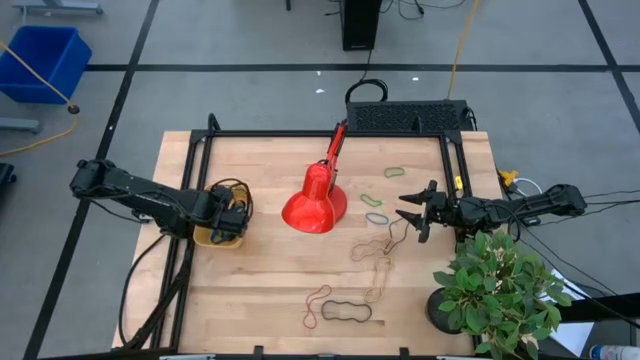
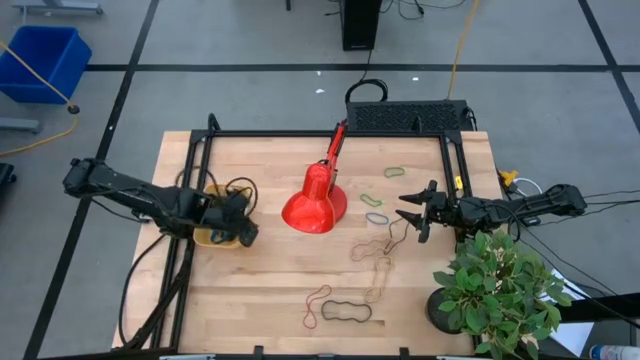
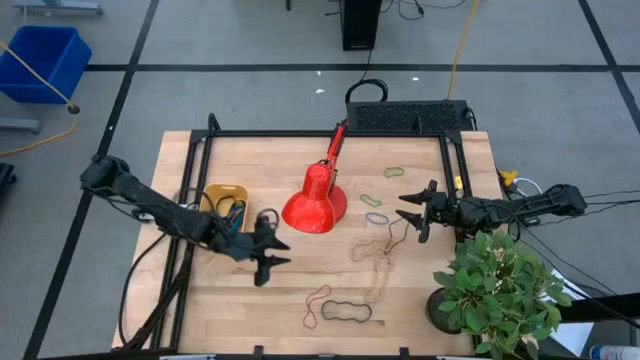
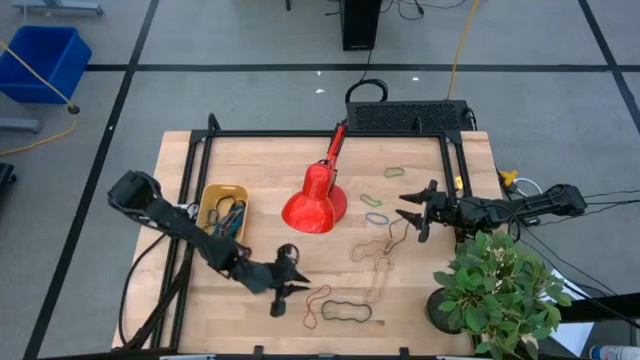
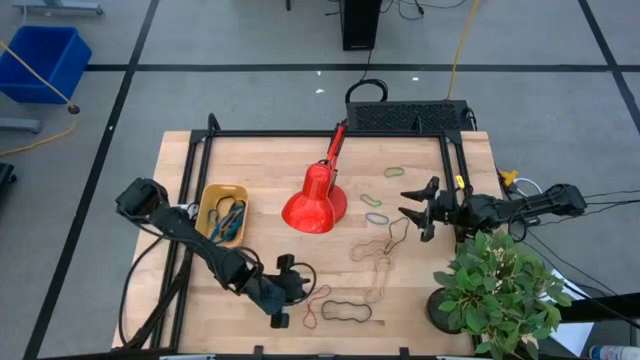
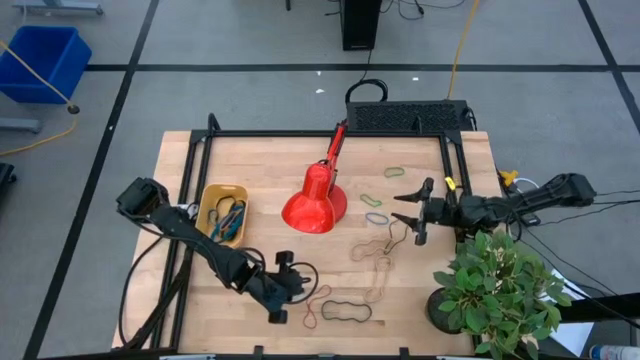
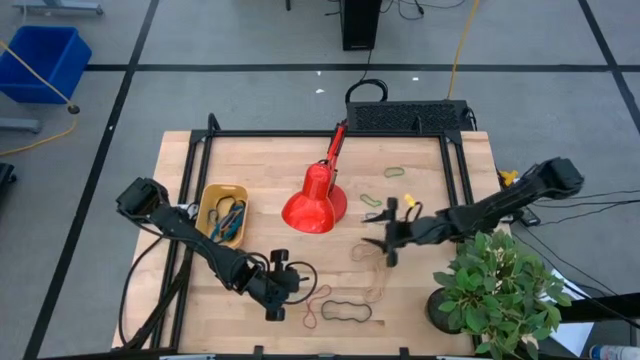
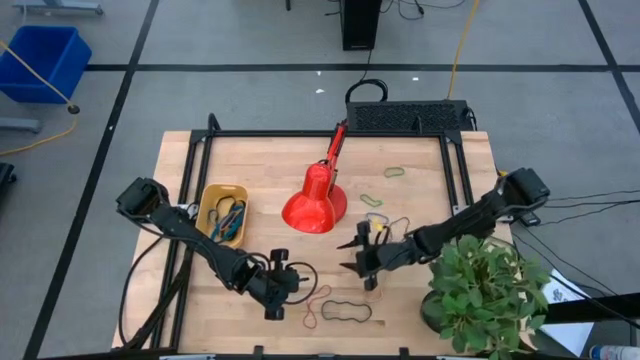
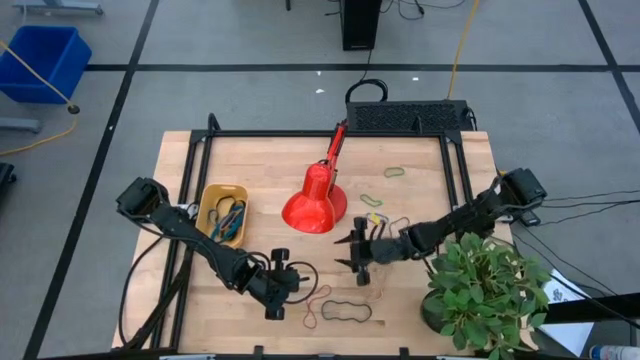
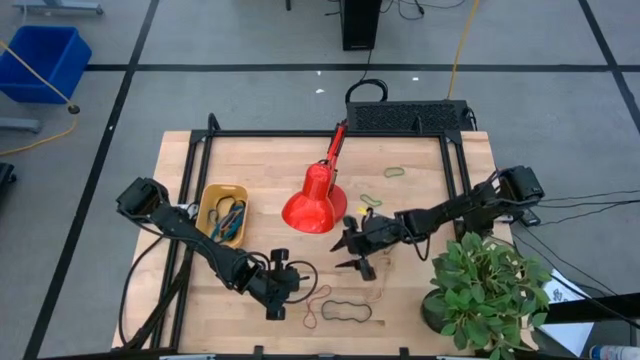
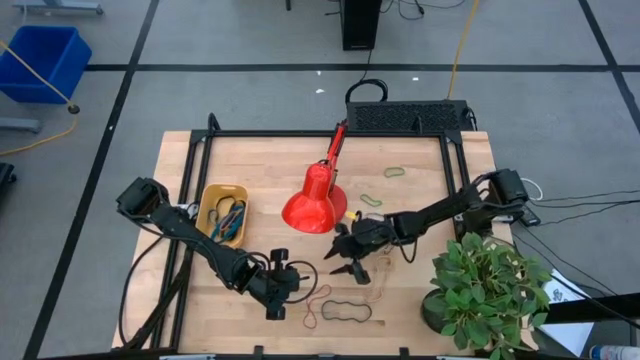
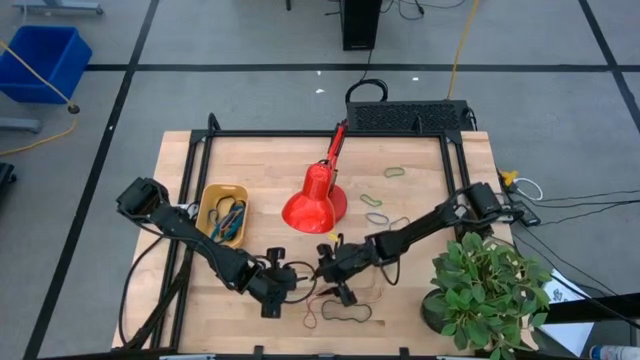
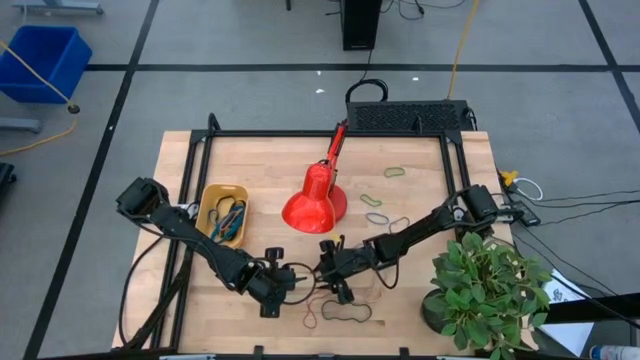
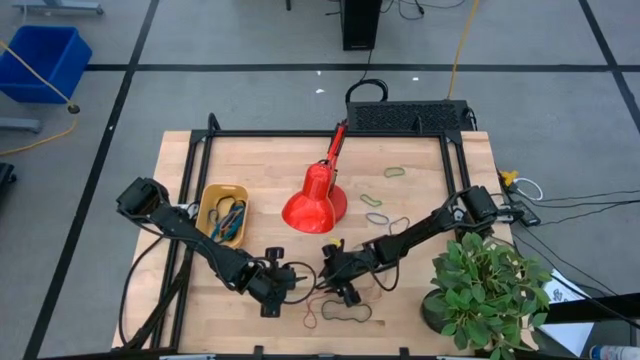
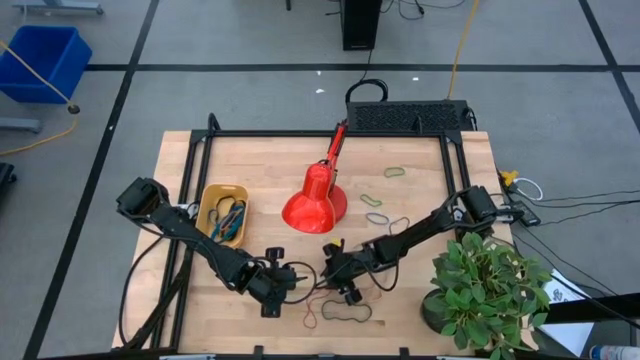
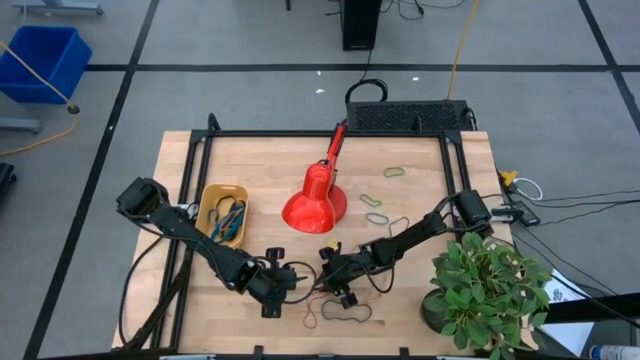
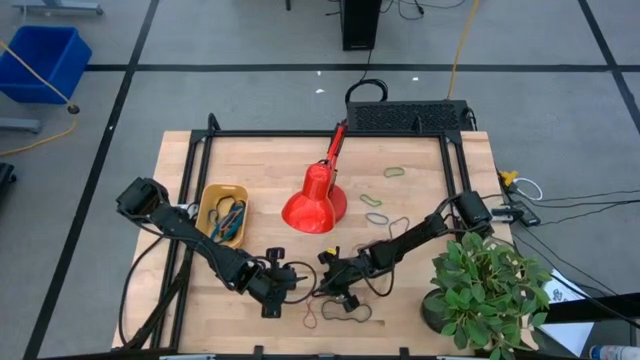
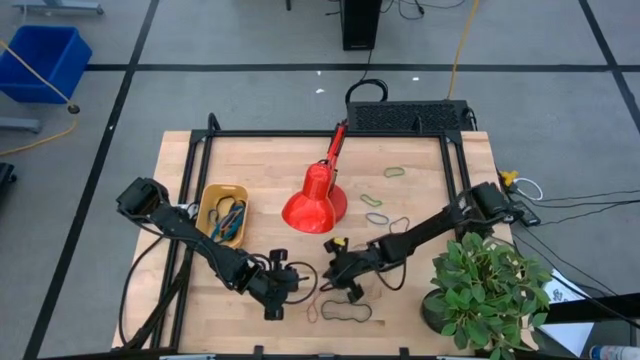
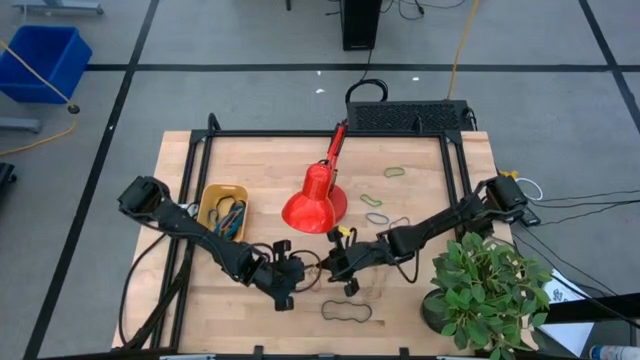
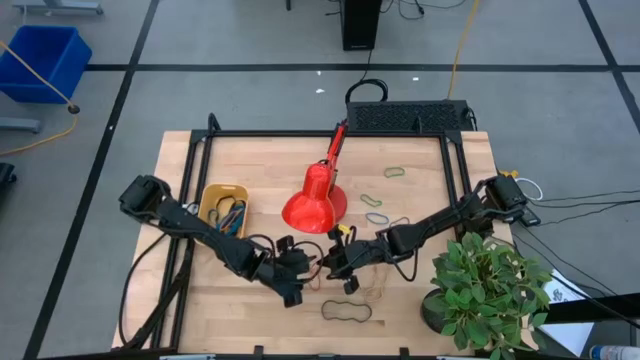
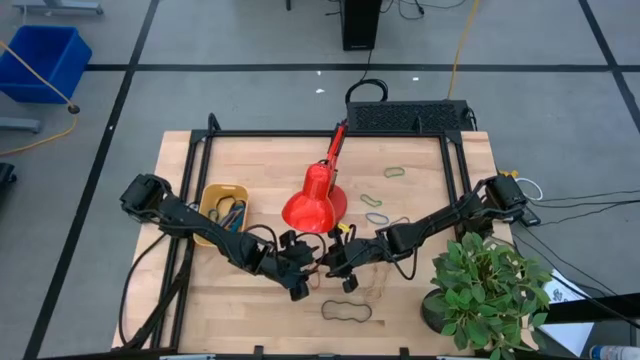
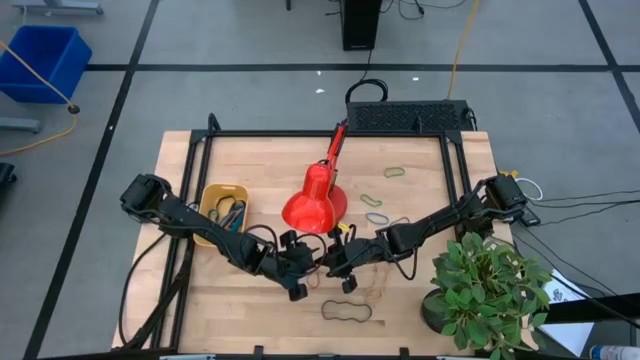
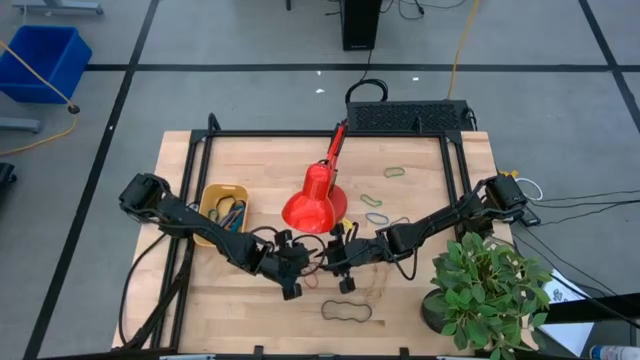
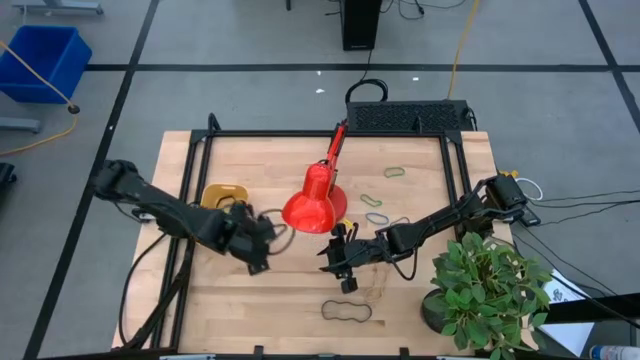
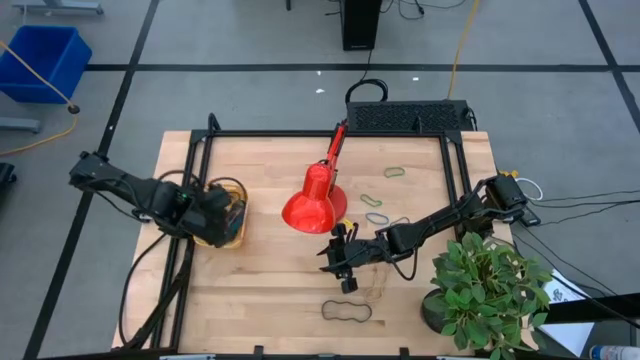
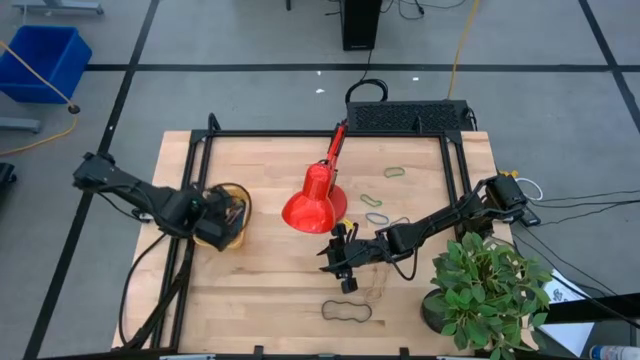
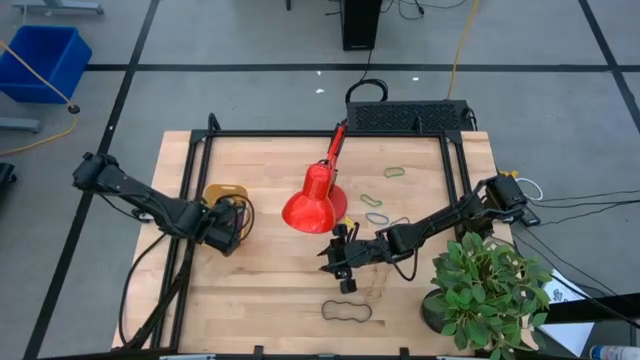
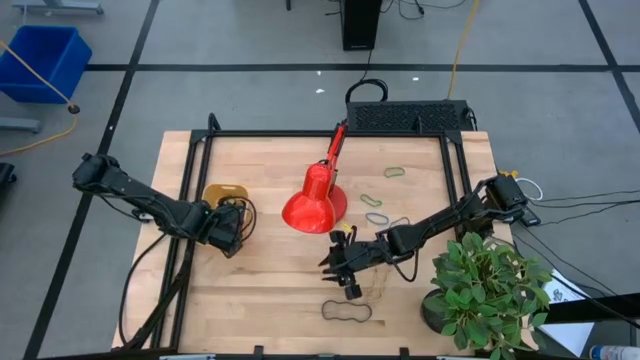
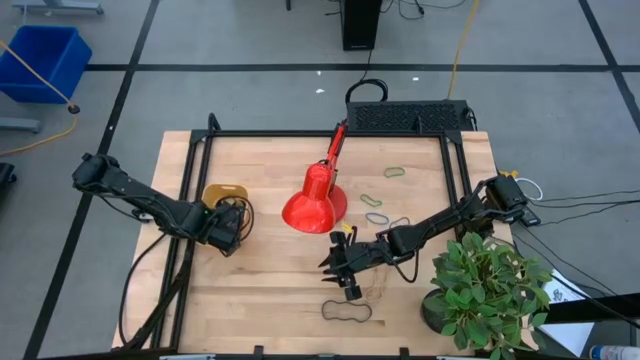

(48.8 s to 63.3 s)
Task: Pick and place rubber bands into bin
Put the red rubber band into the yellow bin

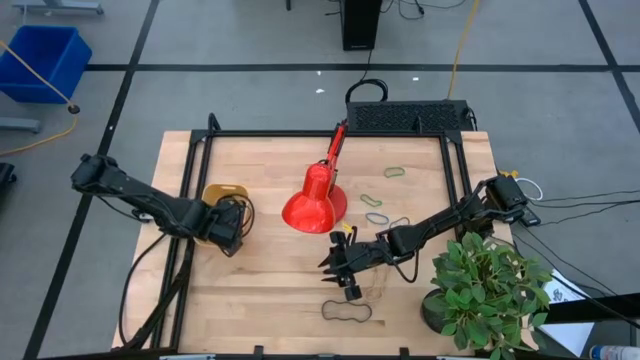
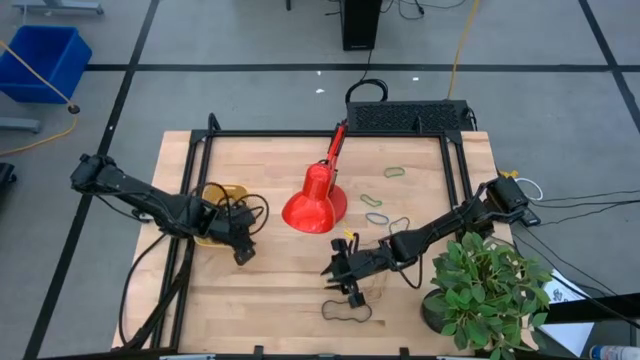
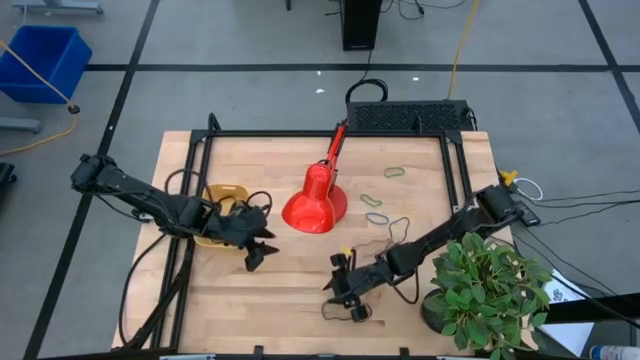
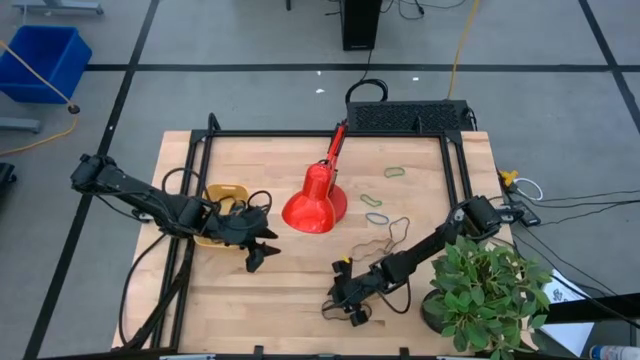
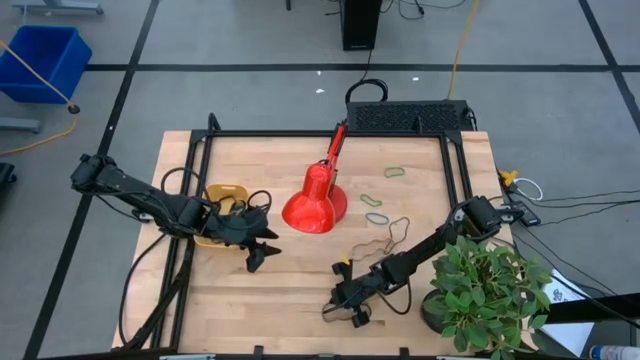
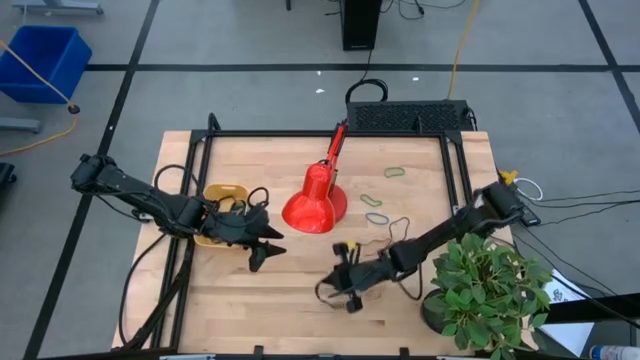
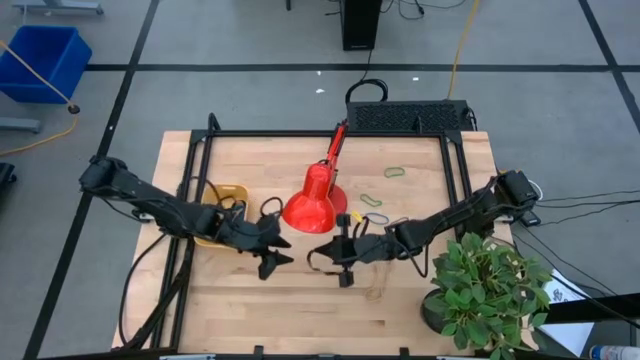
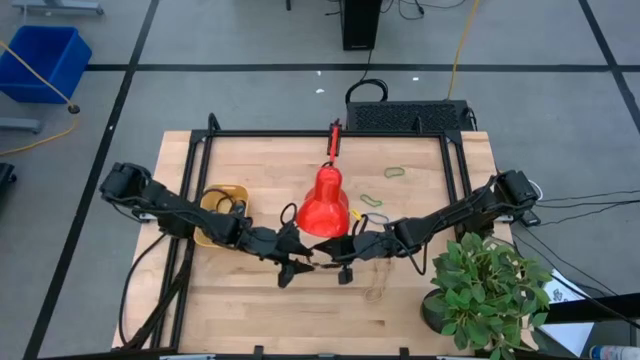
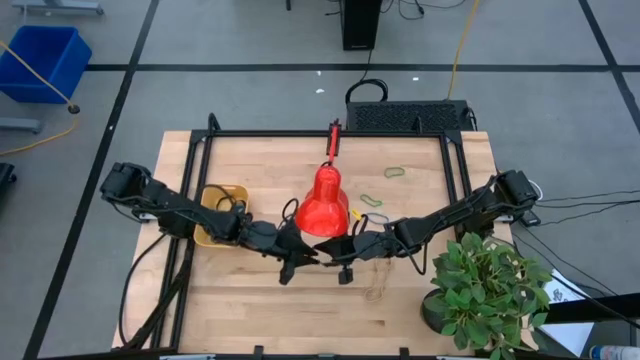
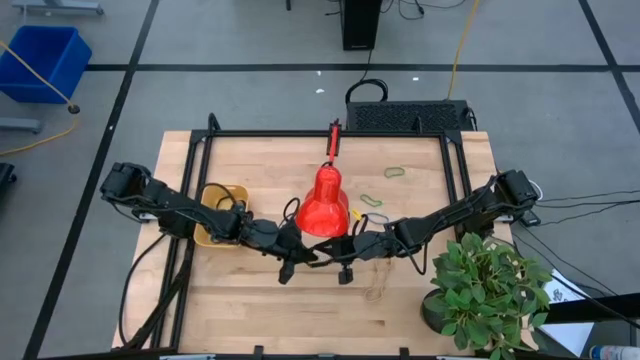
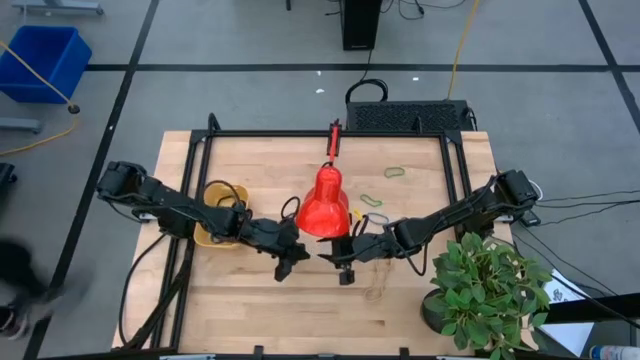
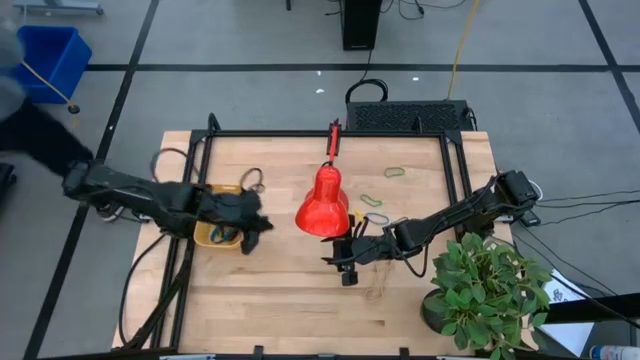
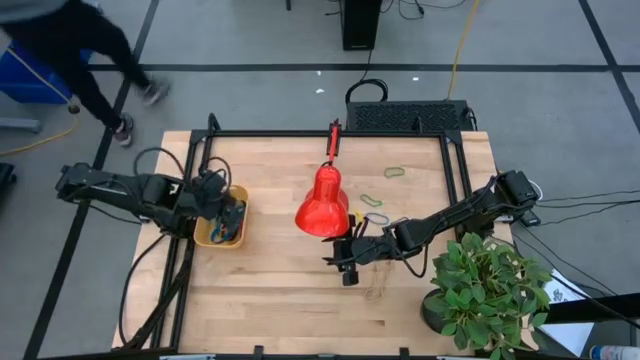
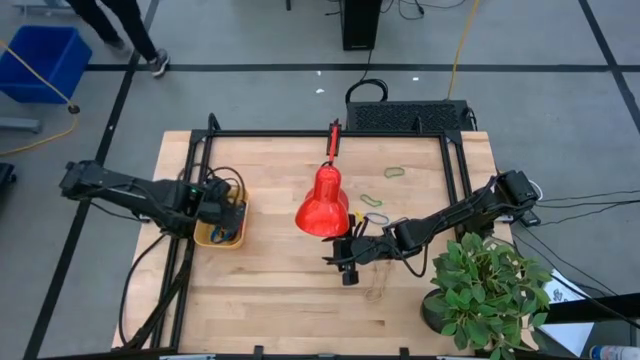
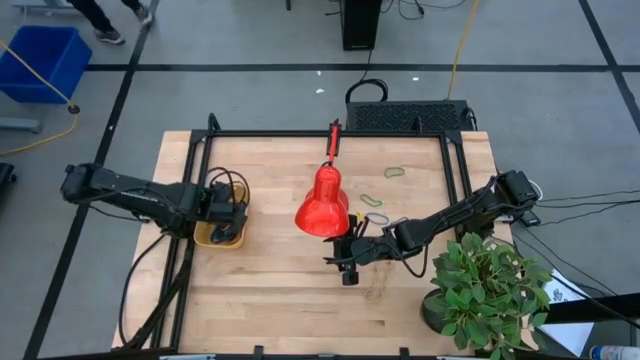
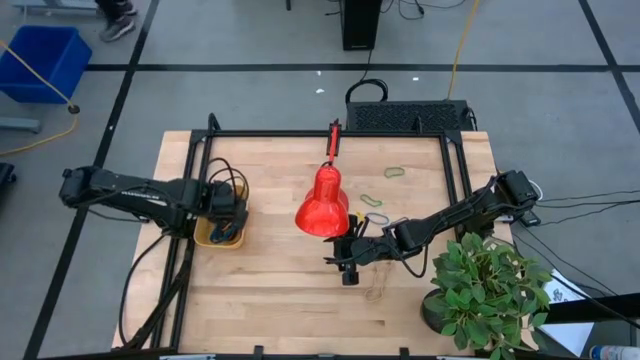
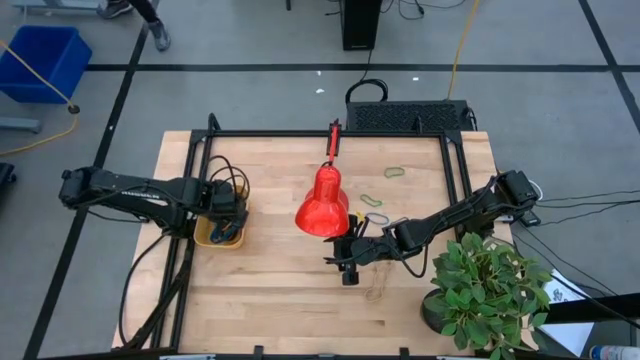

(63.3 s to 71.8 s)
Put the black rubber band into the yellow bin
